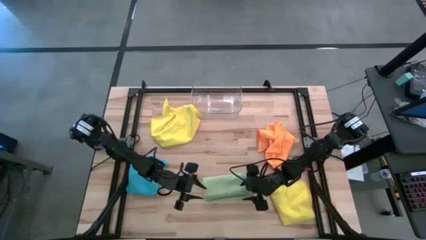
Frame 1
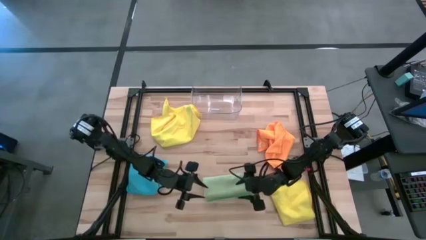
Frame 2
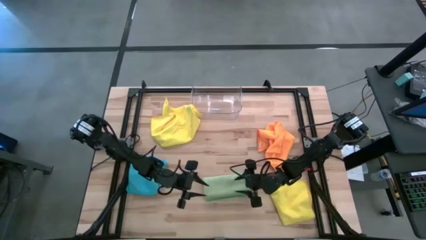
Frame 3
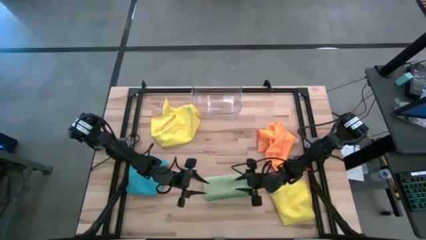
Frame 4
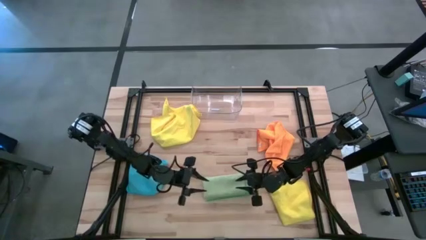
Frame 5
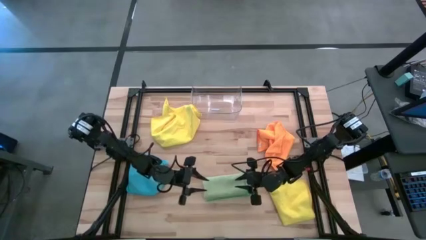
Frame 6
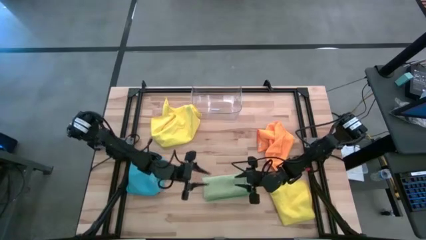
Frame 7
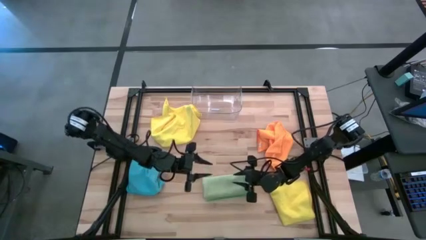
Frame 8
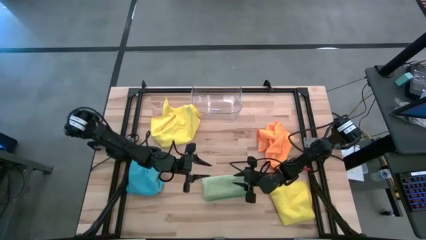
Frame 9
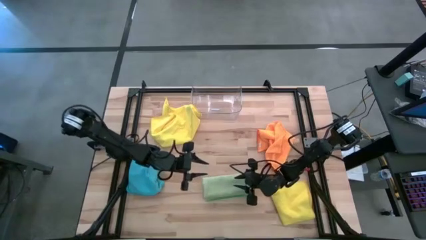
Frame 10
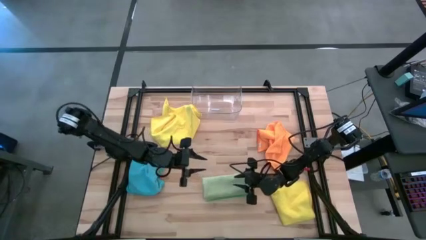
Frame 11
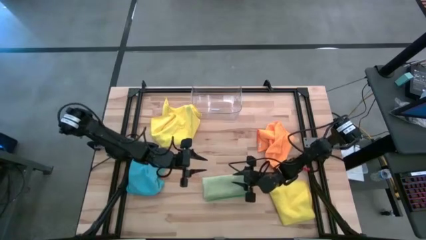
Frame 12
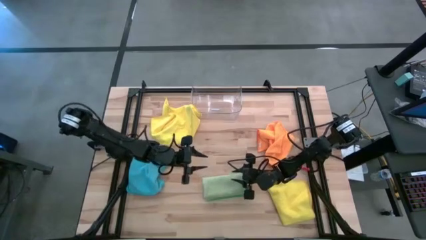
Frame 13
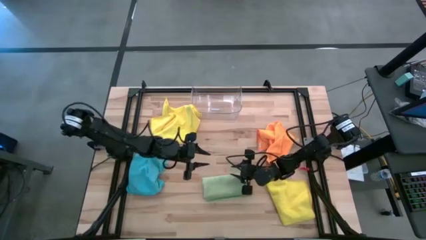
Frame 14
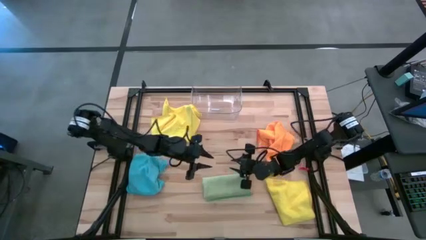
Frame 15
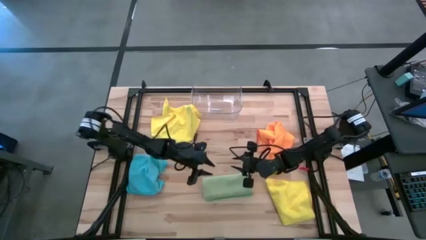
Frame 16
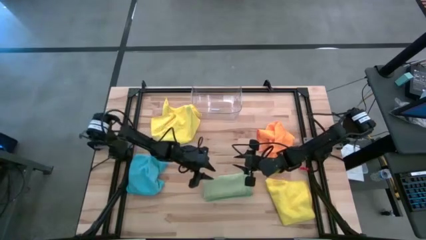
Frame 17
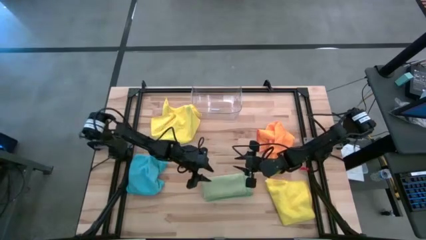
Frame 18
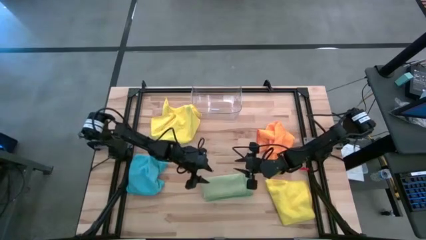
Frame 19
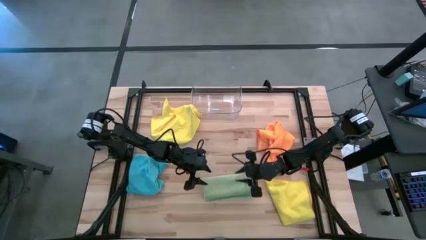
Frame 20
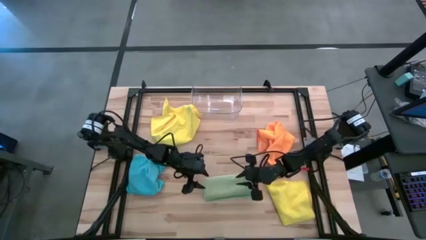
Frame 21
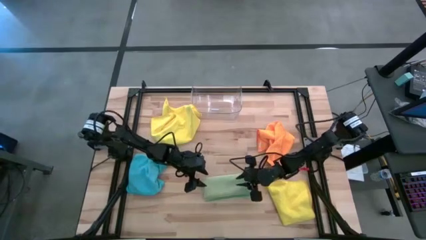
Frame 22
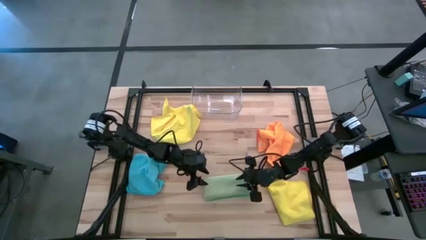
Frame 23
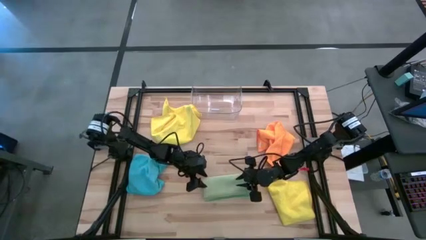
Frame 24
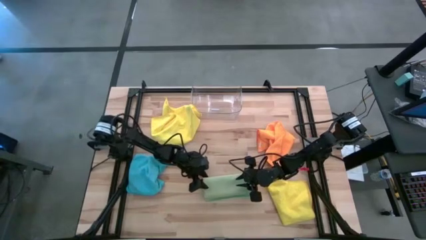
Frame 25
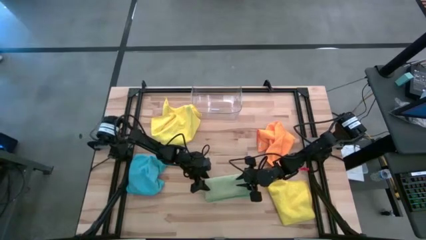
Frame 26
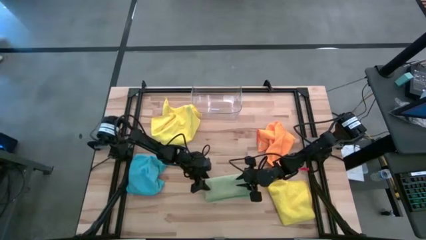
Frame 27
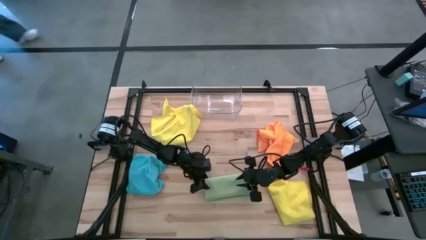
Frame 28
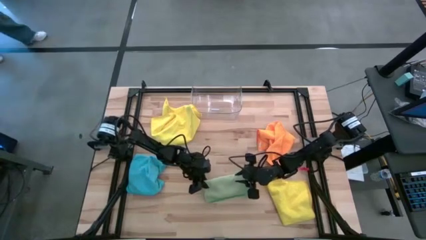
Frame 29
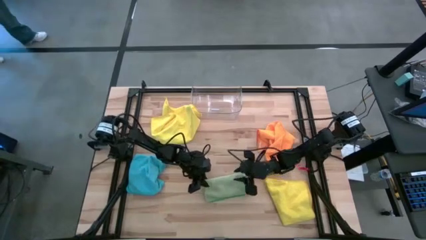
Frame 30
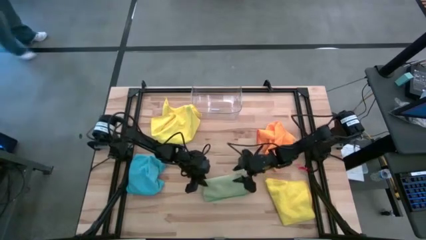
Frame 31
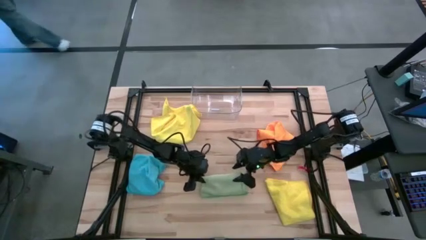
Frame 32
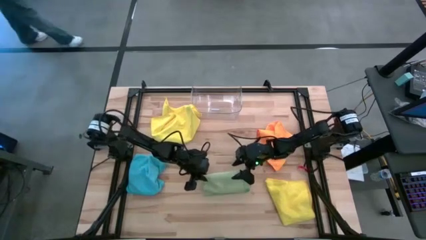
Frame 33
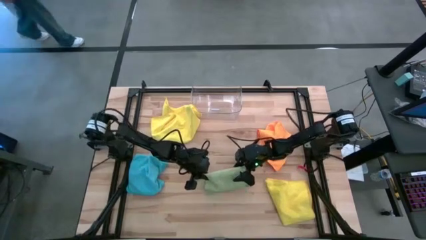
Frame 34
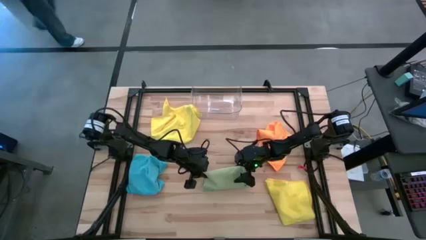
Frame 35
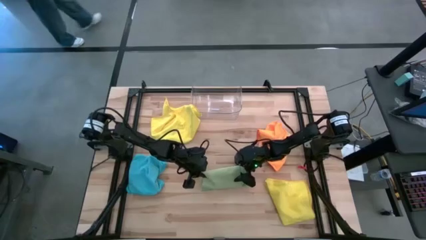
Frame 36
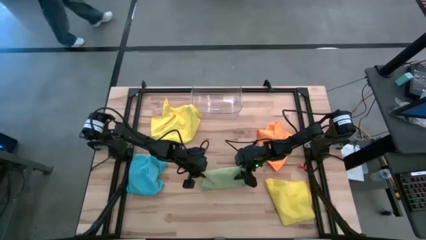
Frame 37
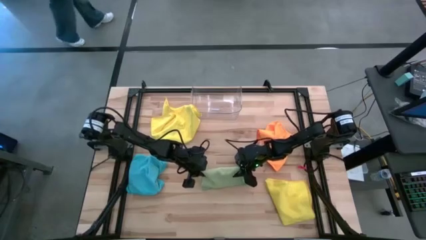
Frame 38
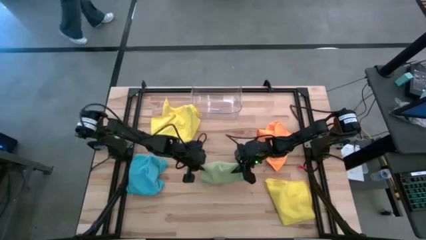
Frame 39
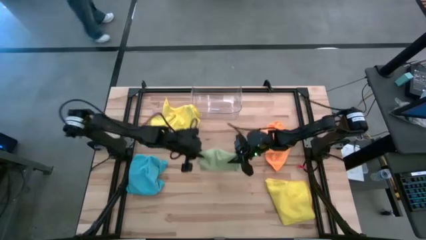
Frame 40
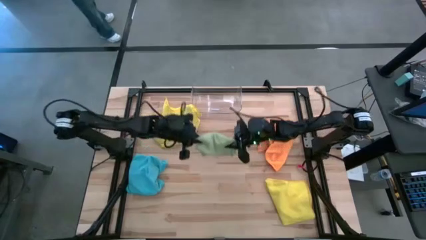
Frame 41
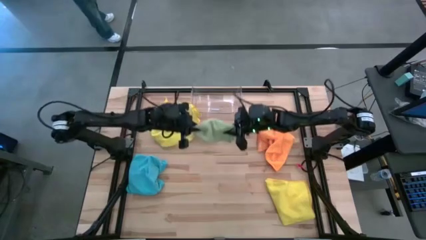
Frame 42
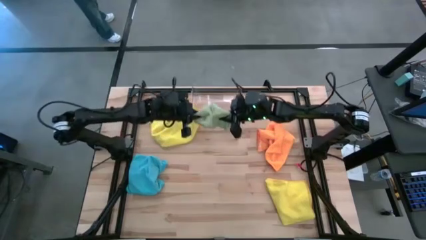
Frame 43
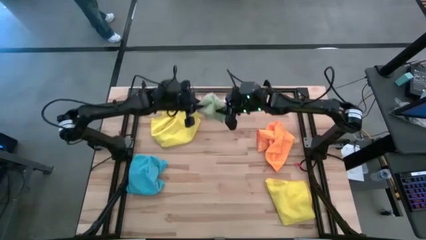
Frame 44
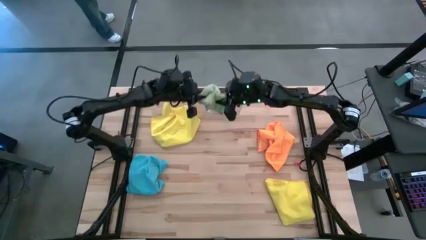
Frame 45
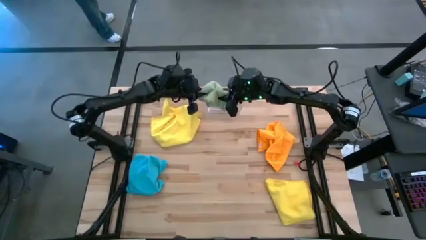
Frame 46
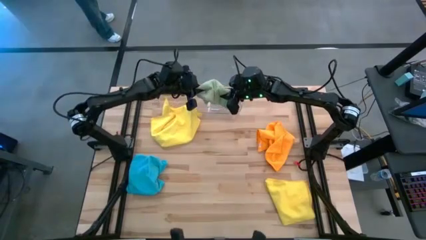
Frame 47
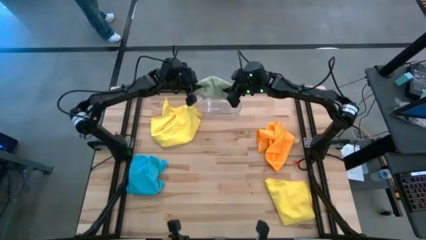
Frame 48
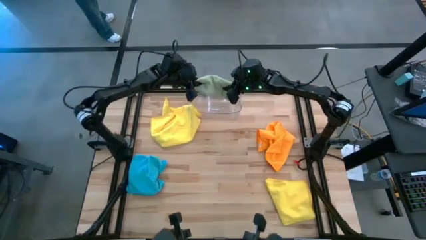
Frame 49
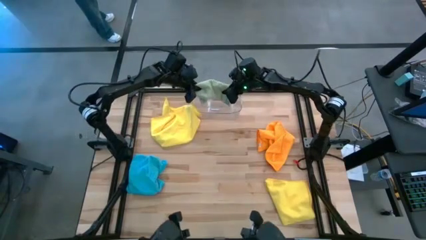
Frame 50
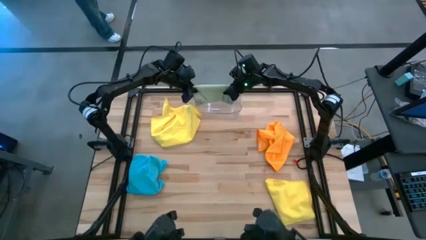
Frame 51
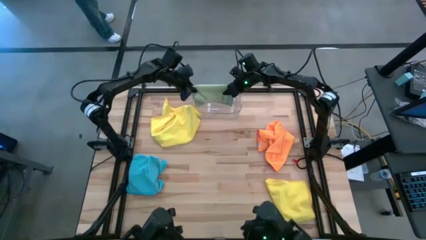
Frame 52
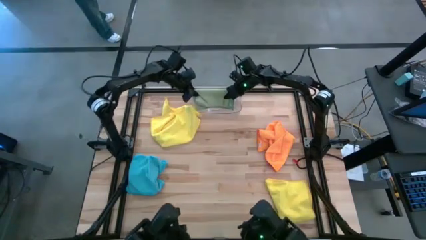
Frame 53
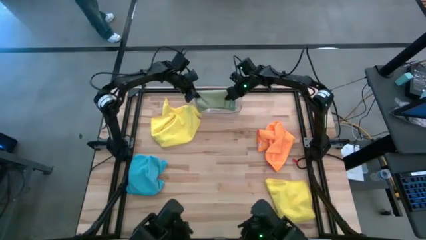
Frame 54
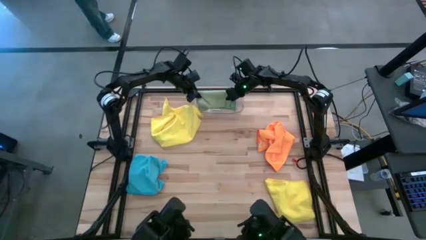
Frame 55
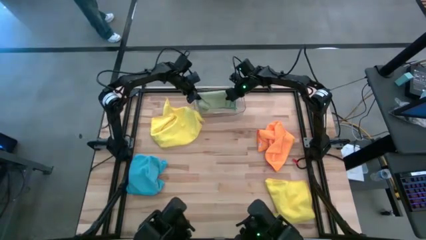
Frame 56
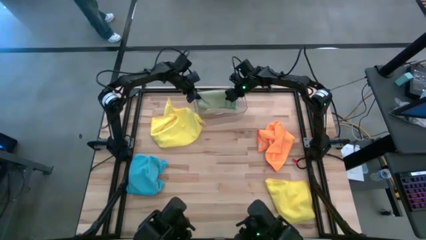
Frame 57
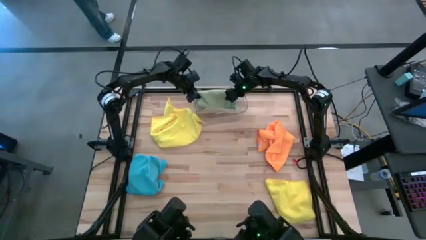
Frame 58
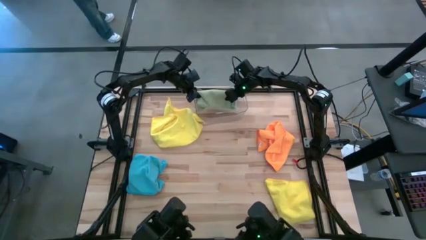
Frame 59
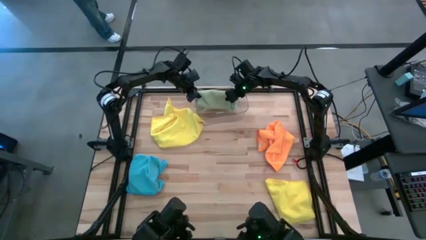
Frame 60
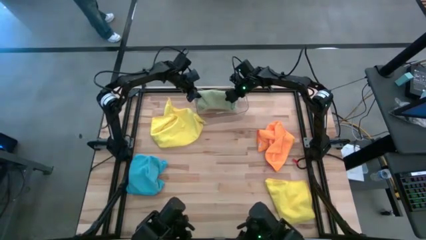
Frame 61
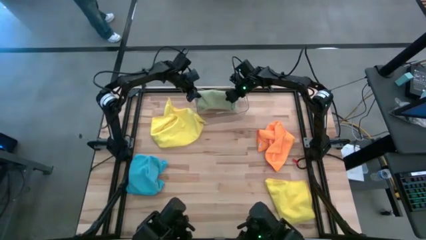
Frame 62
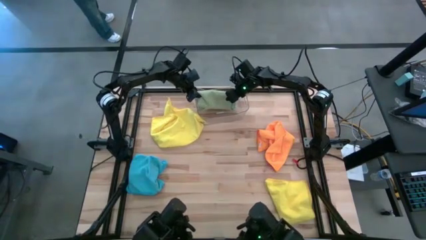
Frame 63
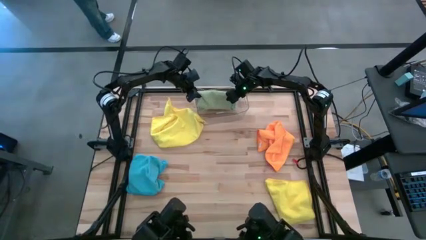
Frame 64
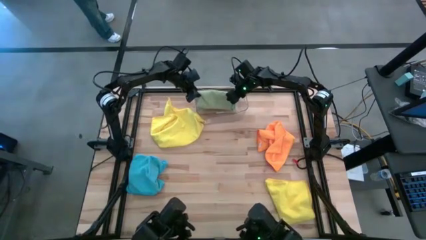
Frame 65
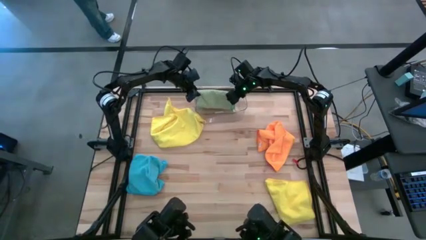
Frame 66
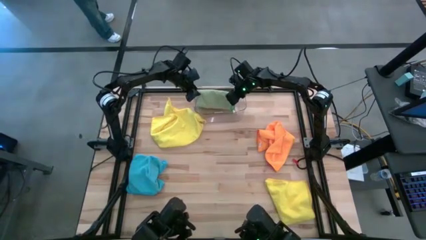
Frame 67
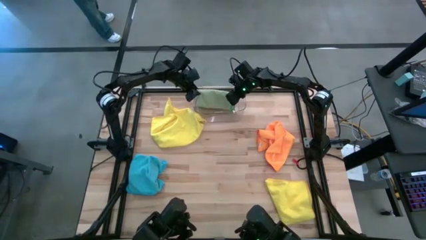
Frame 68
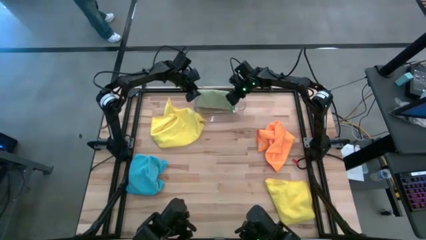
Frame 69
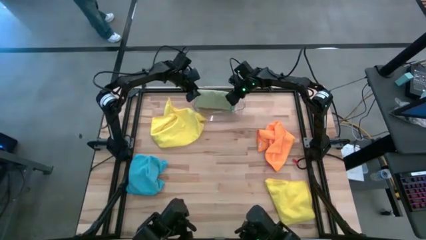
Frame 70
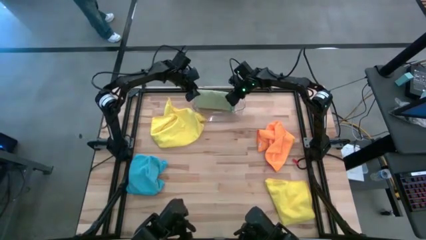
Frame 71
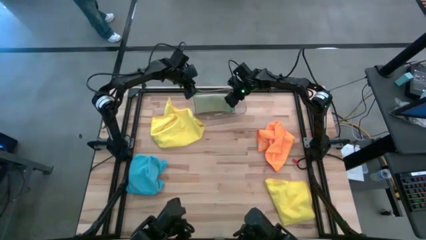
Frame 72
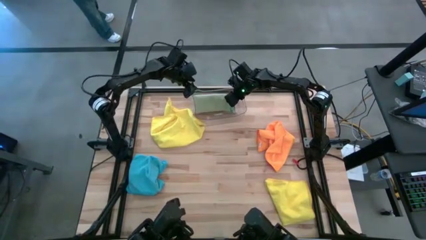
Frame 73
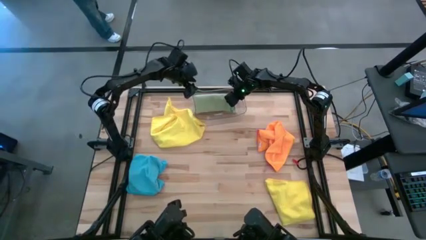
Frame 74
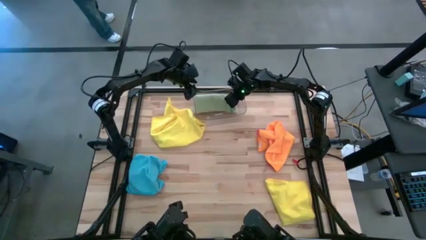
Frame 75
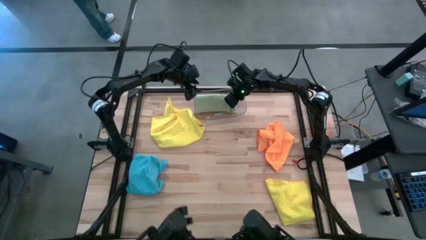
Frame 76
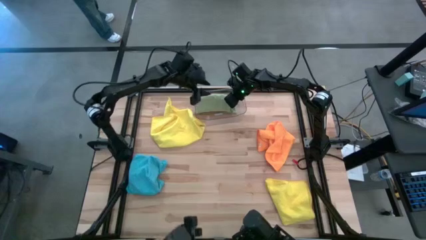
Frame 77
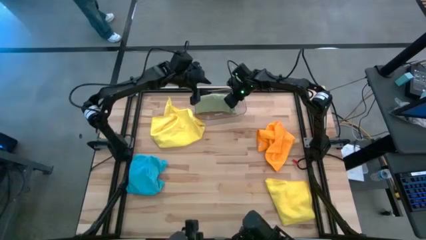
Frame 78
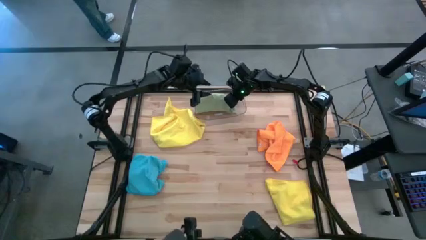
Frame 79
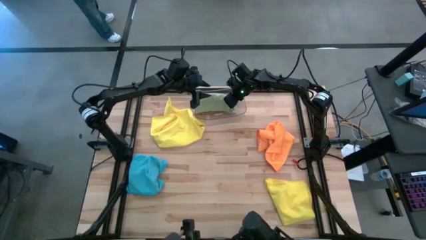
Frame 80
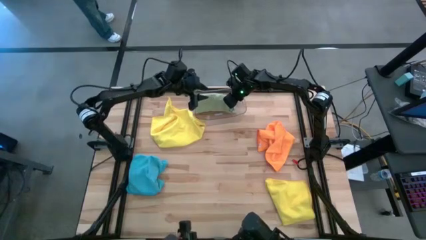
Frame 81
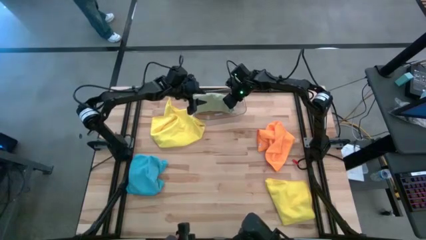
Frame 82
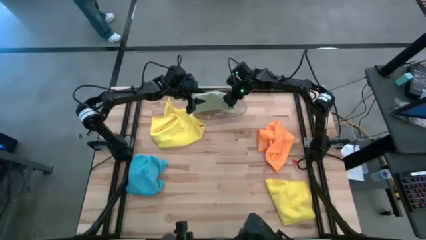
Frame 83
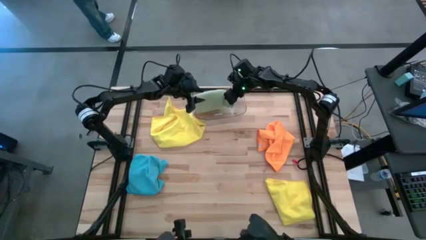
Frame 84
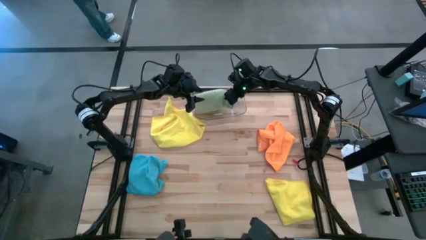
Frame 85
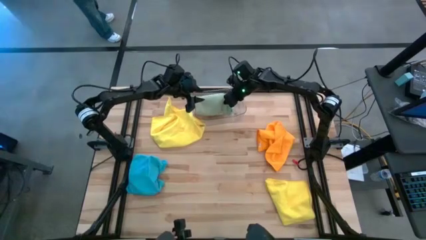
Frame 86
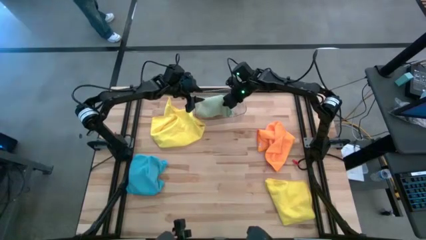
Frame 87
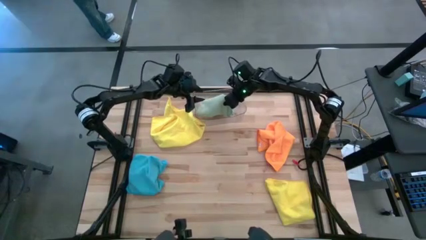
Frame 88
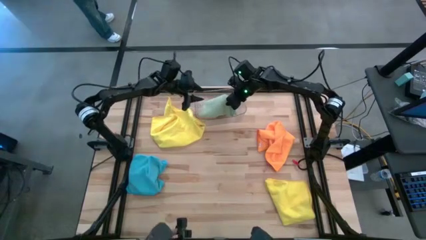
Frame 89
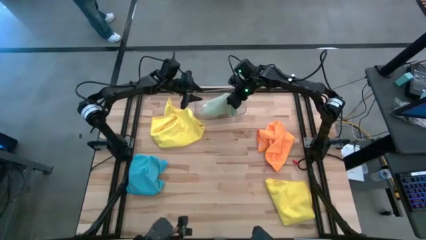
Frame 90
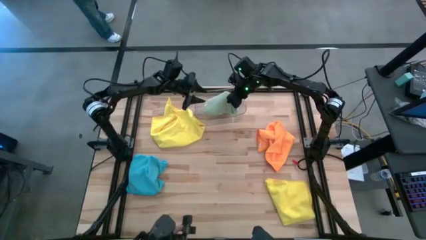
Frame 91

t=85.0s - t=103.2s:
Task: Fold microfiber towels
Put the light green microfiber cloth into the transparent bin
